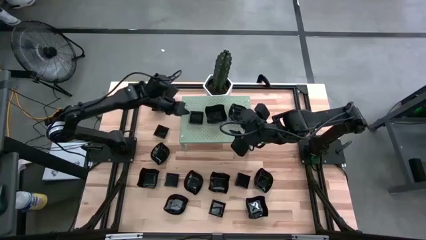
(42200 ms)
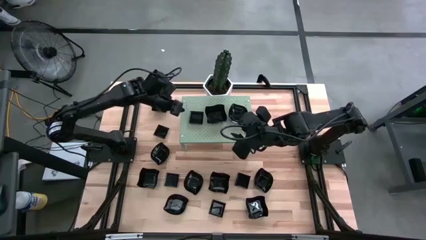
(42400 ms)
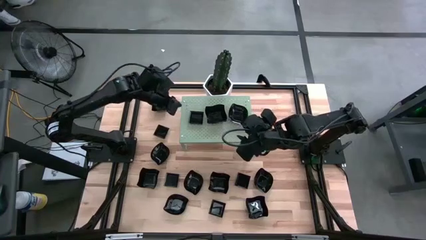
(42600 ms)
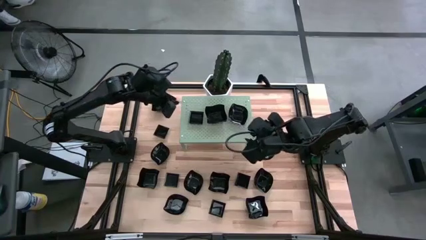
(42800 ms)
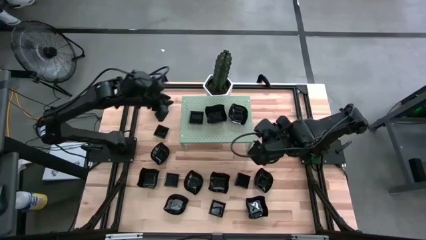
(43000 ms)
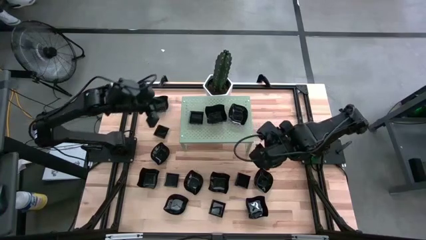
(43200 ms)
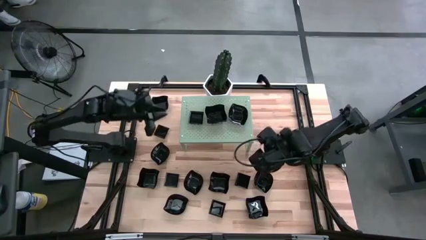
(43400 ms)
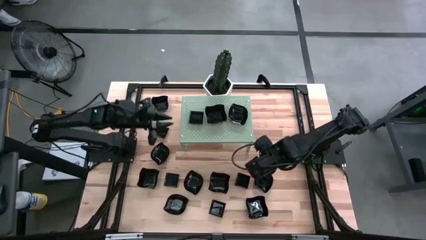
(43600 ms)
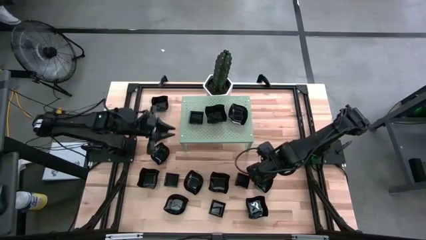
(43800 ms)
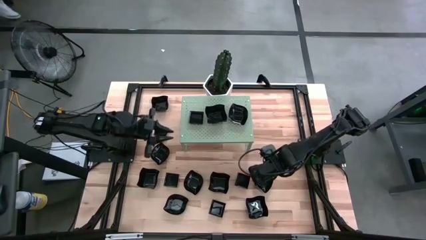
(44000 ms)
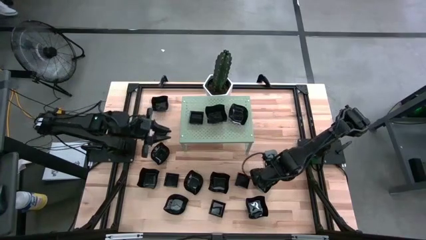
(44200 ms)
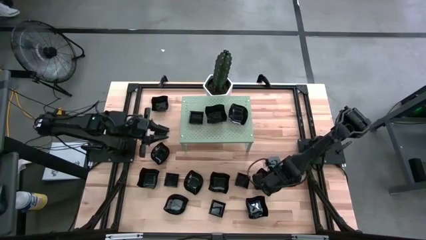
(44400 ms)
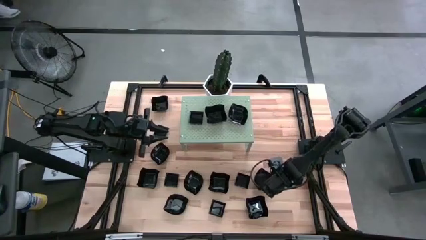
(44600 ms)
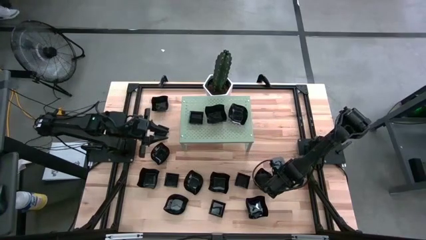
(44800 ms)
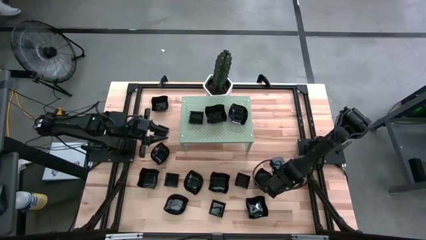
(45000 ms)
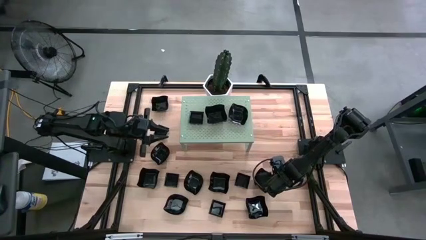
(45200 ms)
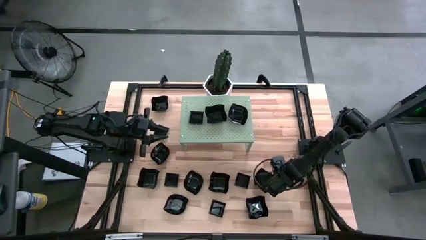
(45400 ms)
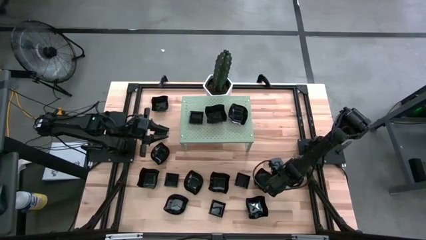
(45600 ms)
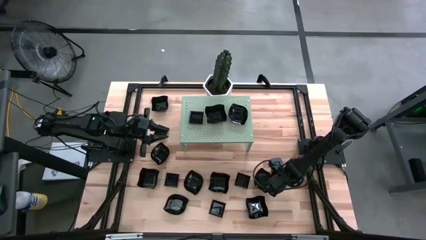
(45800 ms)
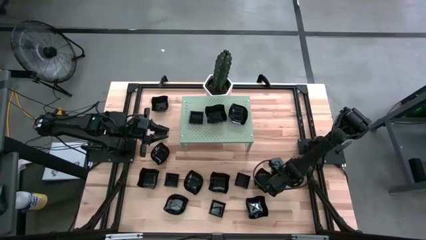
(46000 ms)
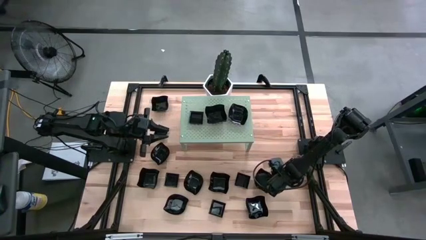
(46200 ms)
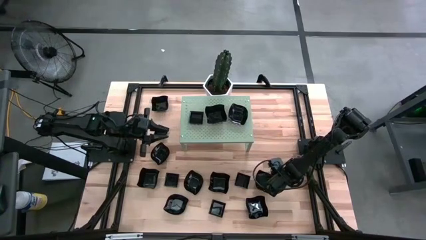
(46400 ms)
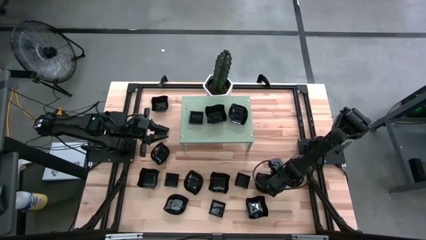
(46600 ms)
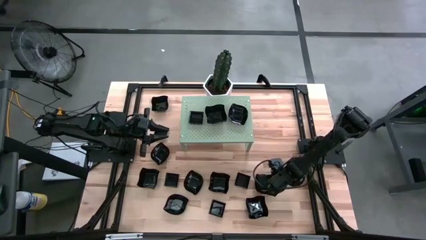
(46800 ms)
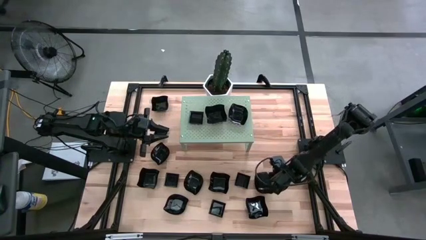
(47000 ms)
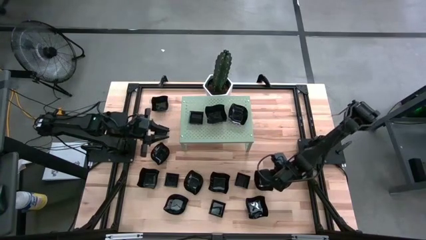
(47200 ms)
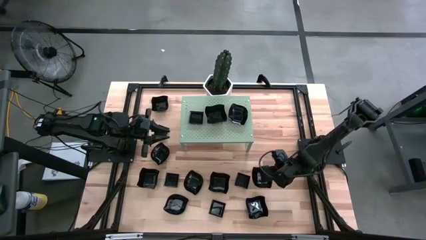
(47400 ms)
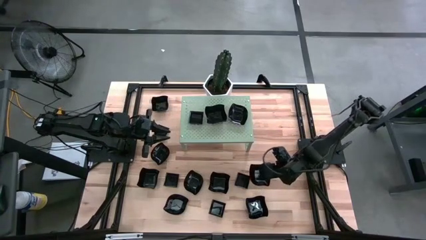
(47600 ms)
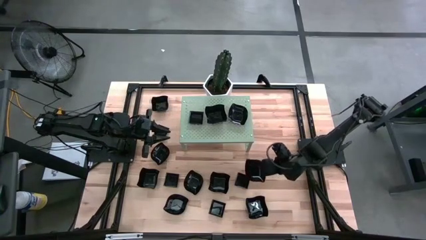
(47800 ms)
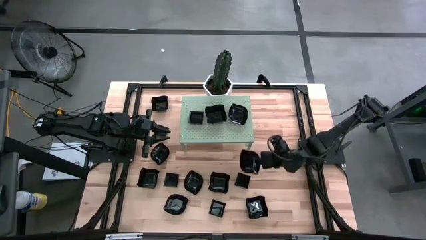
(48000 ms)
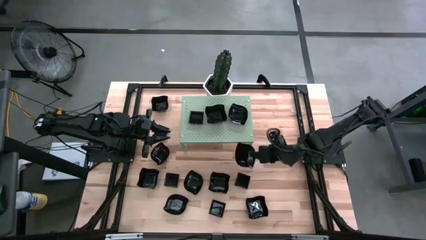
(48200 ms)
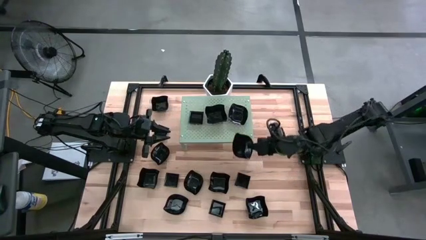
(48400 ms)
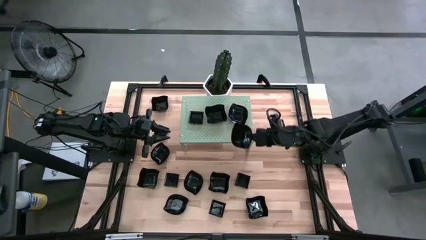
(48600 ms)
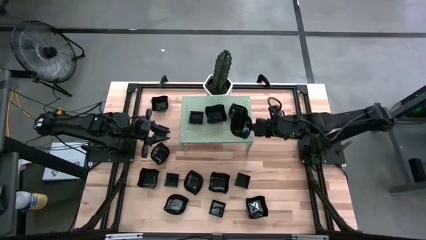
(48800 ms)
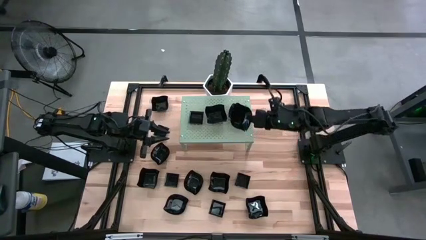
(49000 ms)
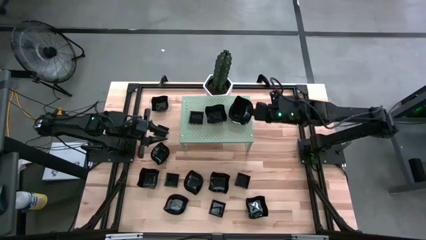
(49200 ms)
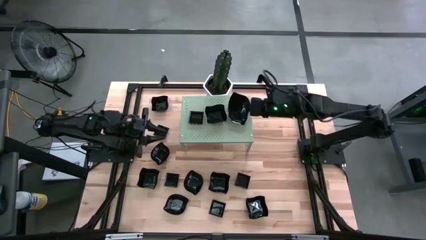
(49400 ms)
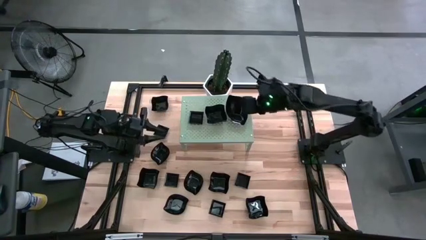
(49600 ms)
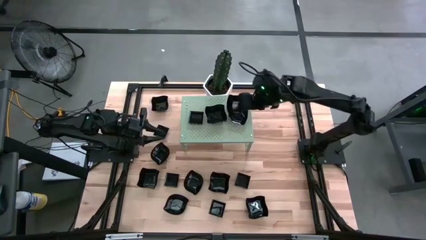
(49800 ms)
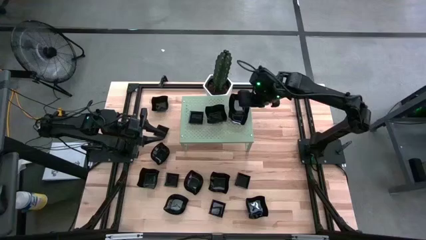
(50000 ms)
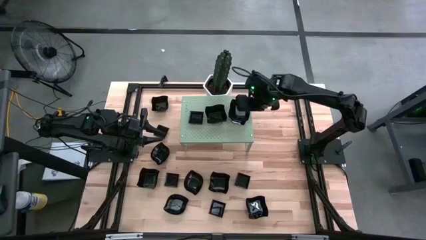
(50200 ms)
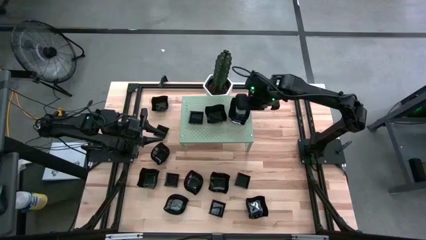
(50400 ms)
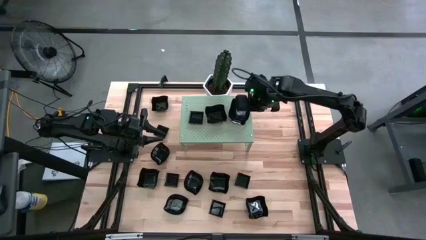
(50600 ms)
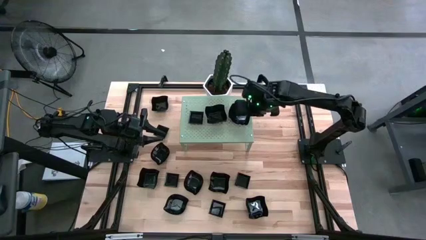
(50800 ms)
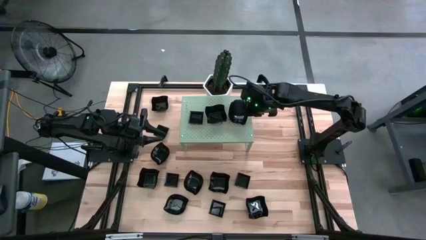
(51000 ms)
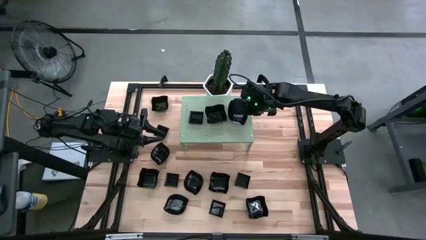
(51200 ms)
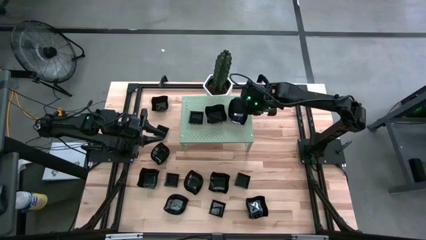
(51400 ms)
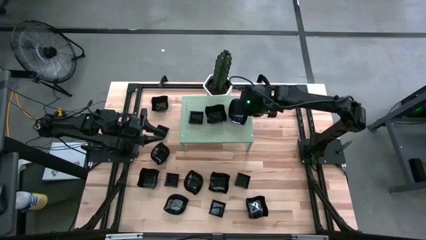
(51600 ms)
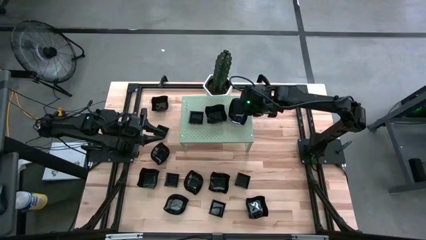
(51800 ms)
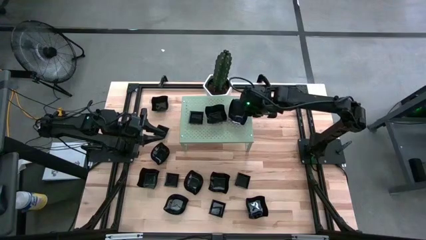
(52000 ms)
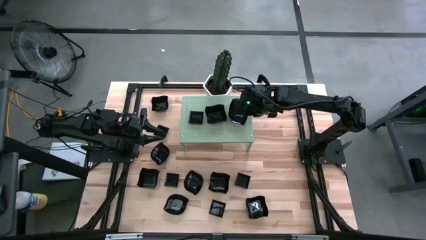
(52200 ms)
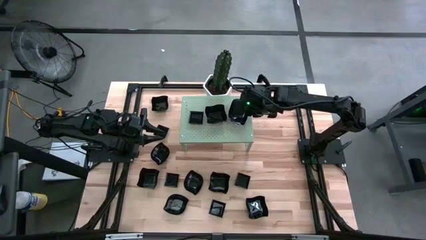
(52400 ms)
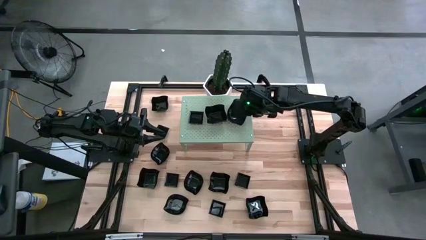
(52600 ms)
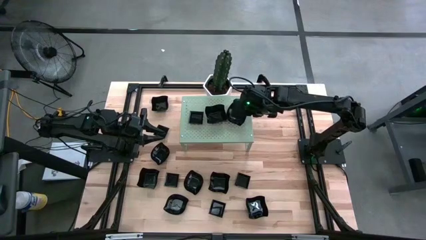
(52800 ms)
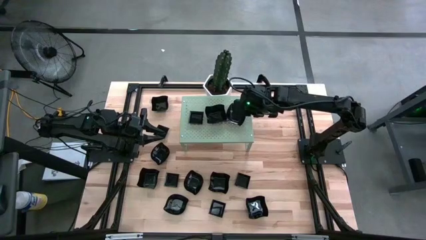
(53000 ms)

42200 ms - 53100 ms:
Task: Pick & Place Mini shaped plates
Stack the leaf shaped plate on top of the leaf shaped plate on the shelf

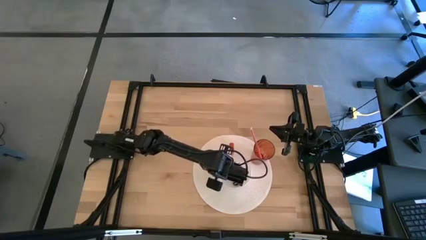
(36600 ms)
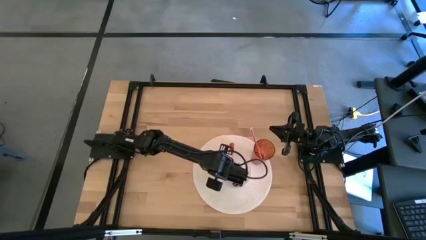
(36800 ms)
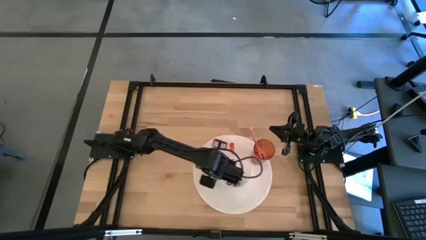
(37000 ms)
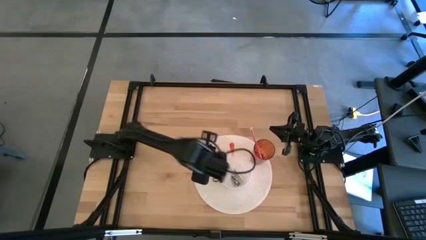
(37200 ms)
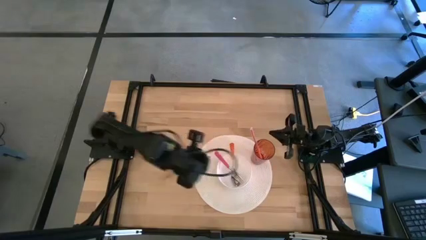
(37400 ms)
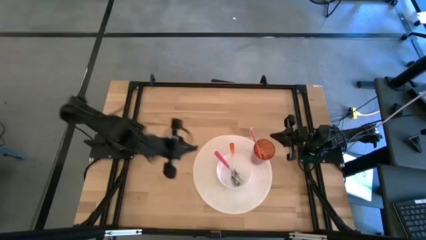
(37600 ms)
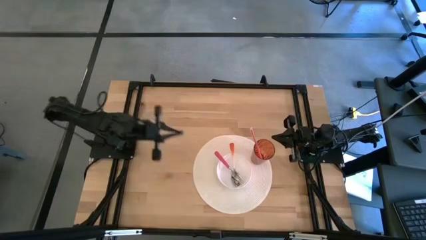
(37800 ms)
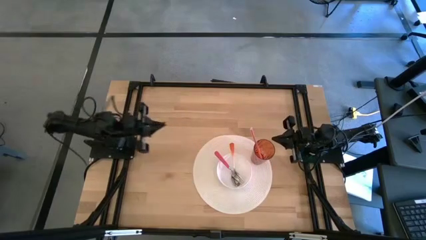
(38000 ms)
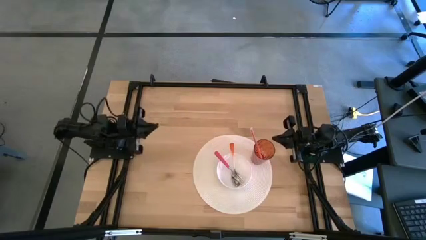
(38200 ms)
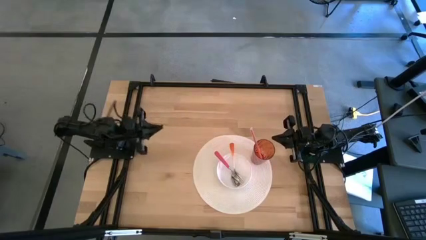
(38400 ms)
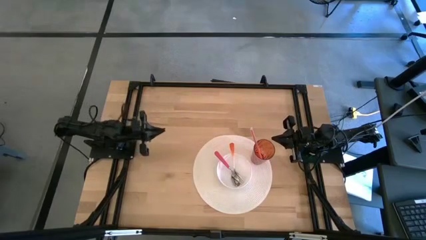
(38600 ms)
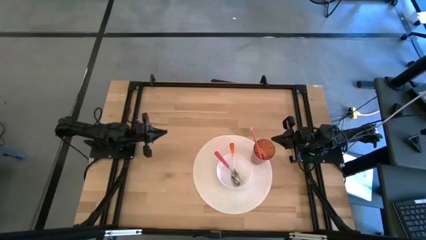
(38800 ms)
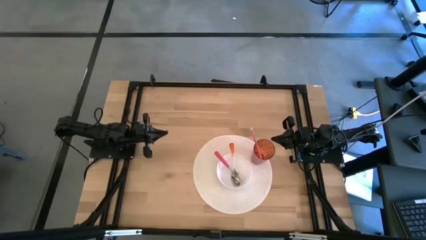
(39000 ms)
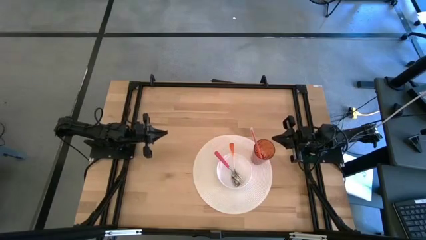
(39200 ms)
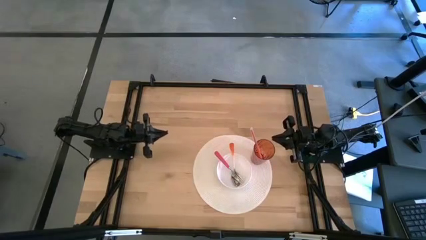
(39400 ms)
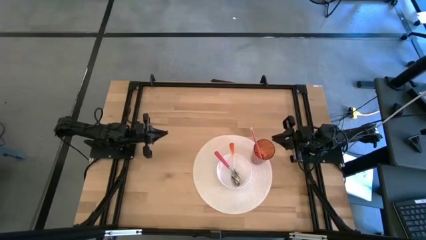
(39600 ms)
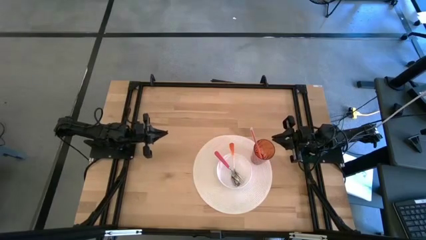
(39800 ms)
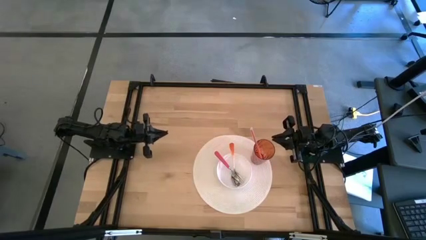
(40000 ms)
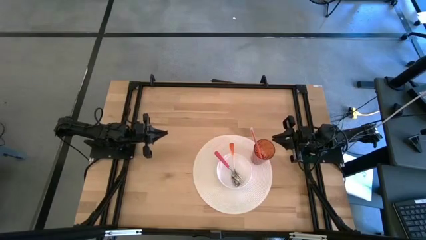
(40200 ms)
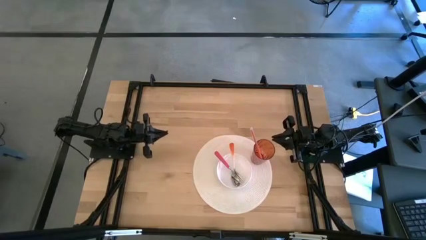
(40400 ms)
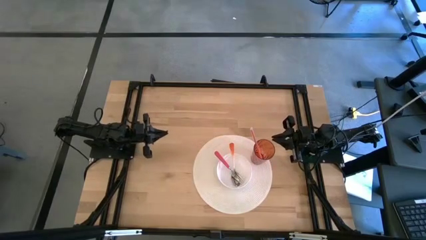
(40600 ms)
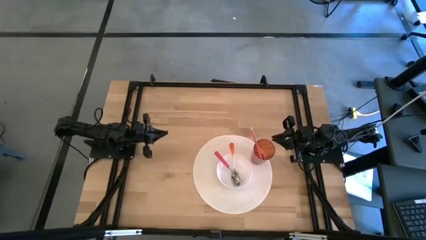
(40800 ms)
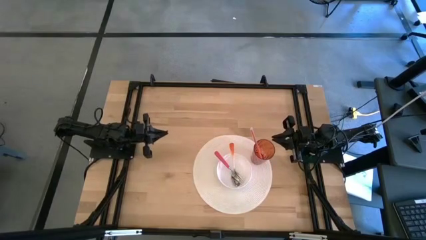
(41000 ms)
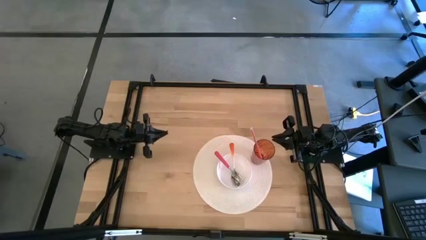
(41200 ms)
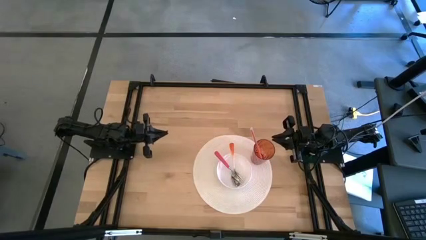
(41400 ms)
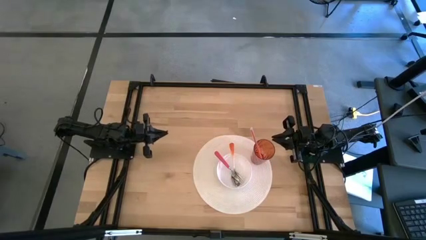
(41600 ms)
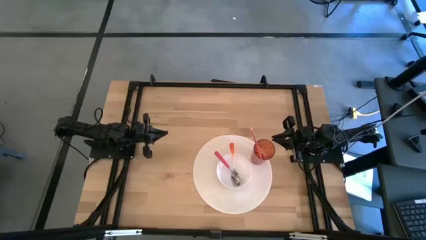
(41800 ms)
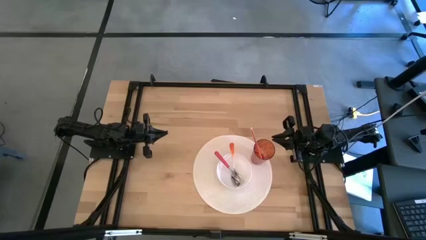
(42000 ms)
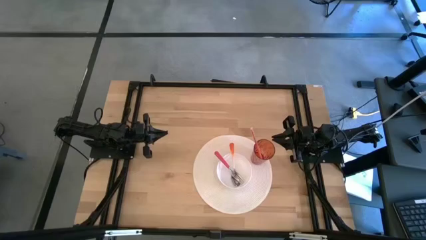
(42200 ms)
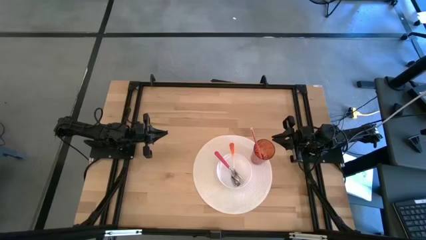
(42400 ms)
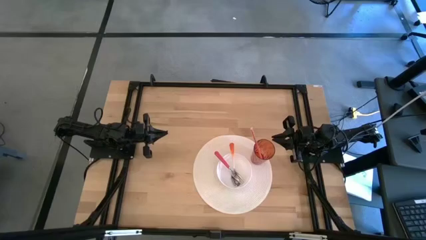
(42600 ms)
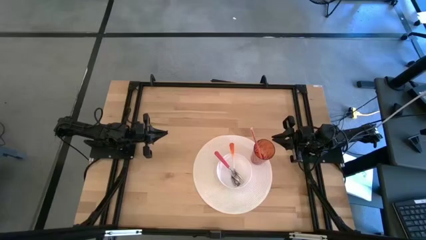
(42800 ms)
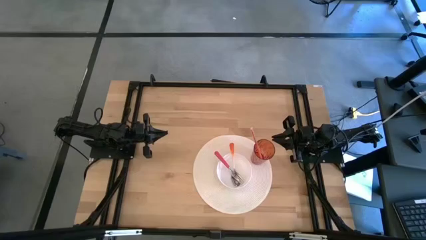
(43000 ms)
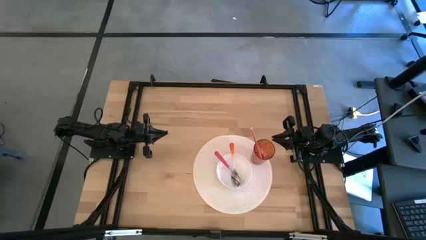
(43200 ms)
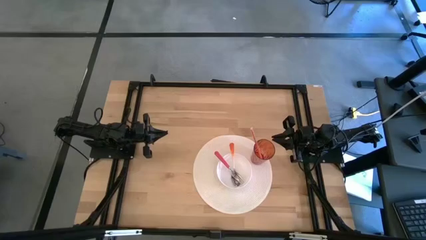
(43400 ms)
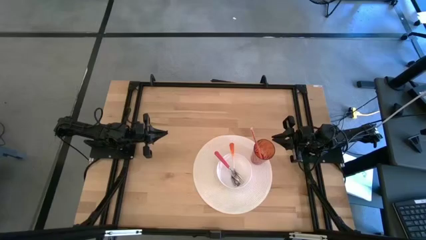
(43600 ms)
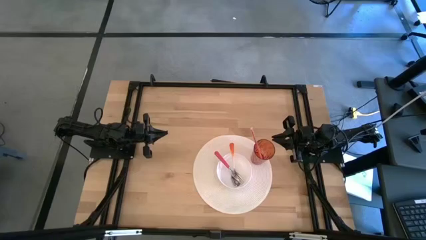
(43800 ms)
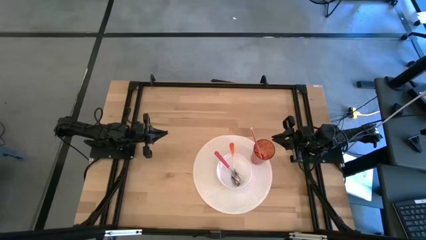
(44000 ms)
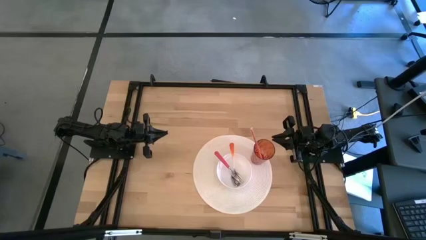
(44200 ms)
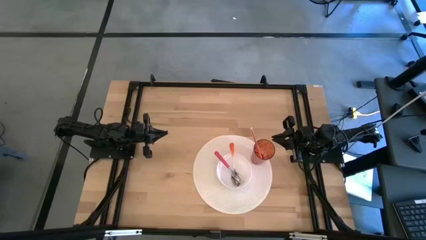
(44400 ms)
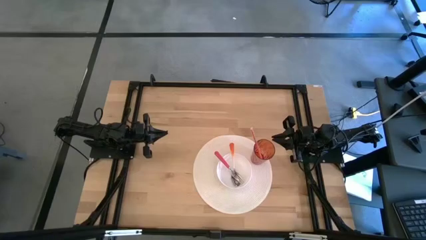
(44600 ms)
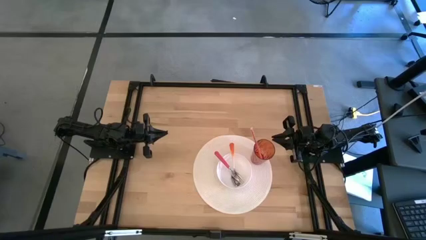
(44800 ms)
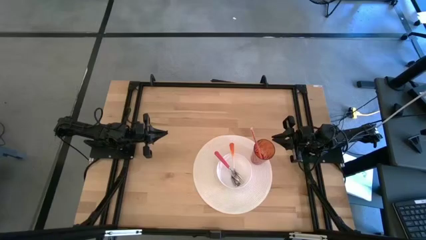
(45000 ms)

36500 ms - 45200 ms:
Task: Pick & Place Utensil
Return to Home Position
